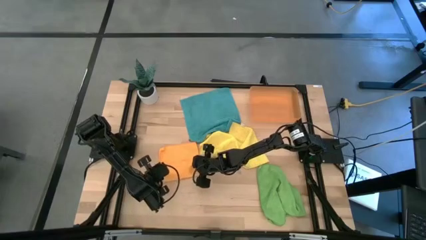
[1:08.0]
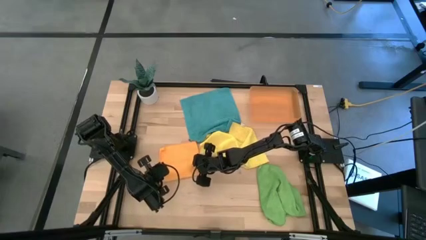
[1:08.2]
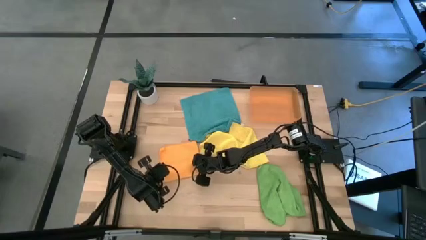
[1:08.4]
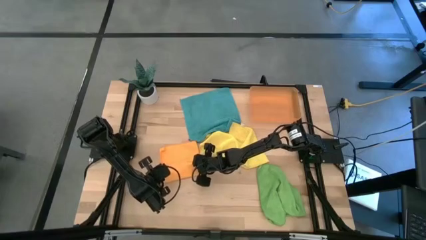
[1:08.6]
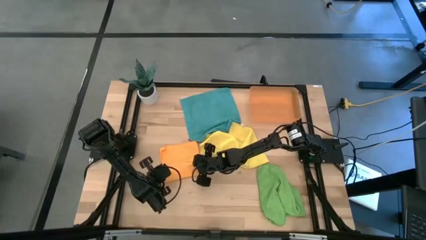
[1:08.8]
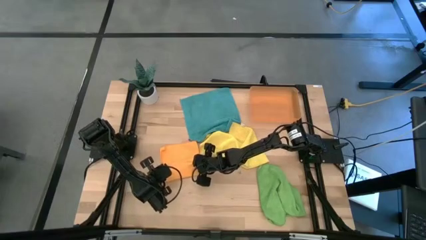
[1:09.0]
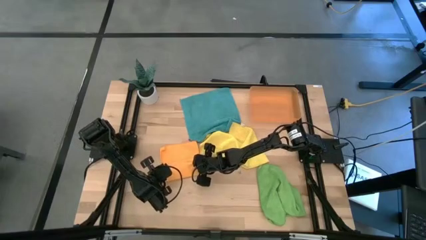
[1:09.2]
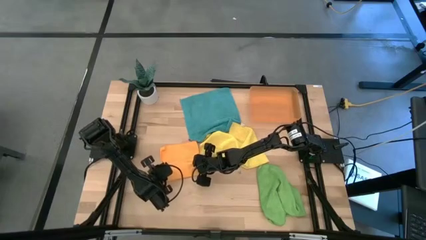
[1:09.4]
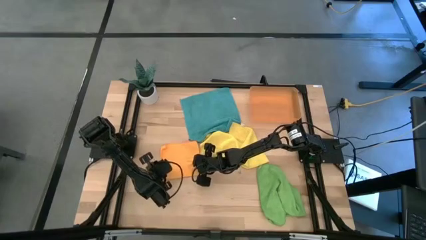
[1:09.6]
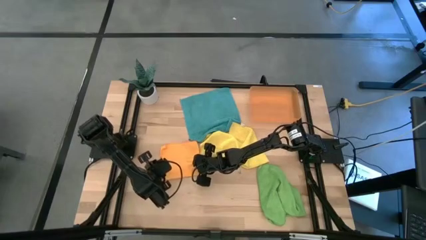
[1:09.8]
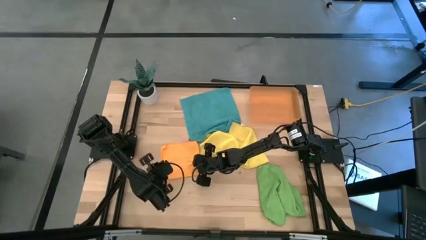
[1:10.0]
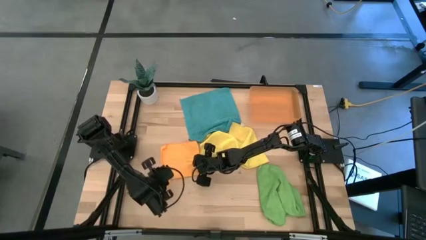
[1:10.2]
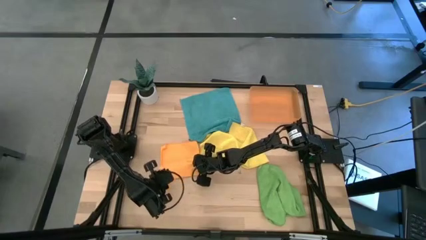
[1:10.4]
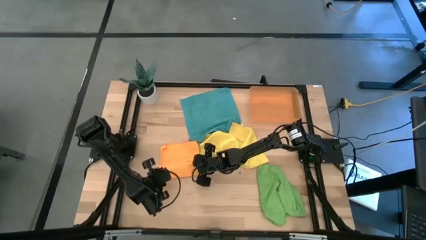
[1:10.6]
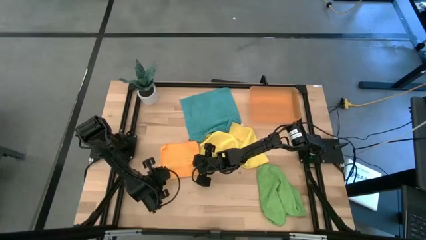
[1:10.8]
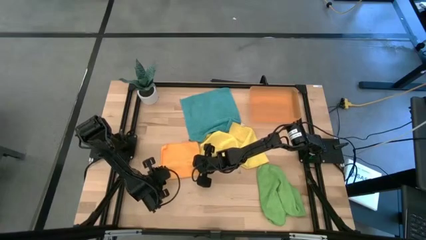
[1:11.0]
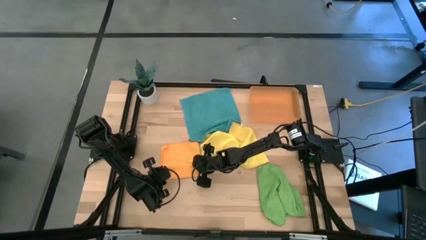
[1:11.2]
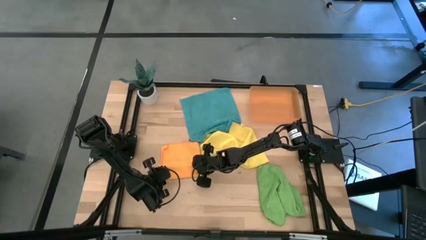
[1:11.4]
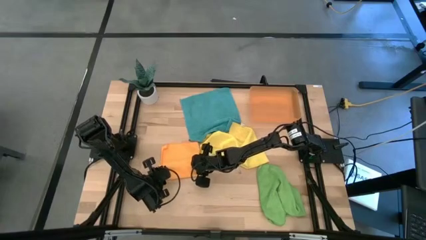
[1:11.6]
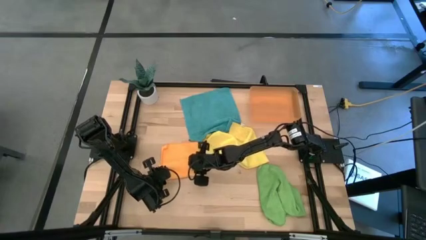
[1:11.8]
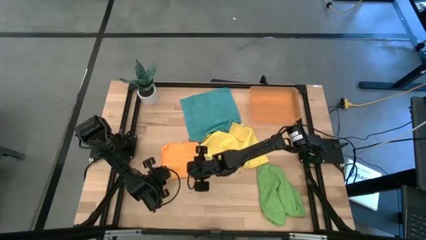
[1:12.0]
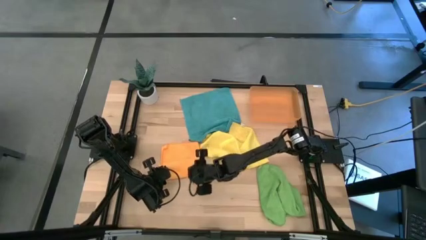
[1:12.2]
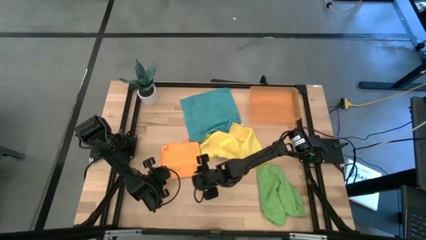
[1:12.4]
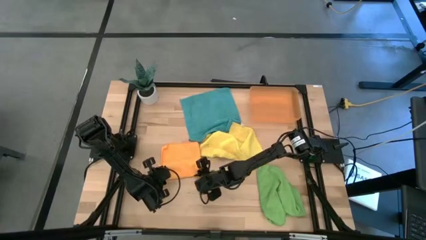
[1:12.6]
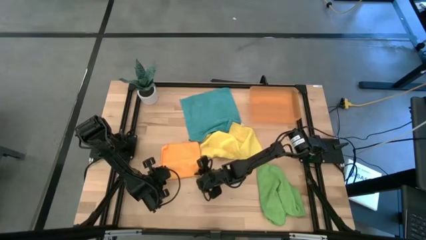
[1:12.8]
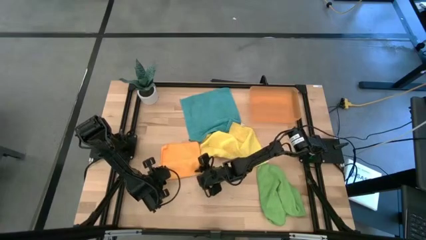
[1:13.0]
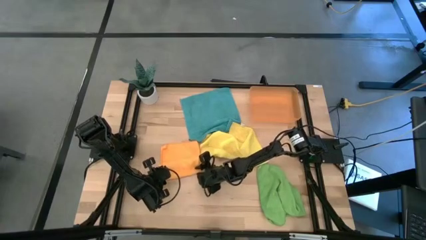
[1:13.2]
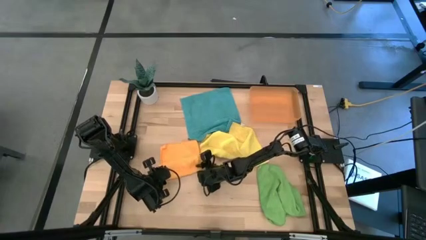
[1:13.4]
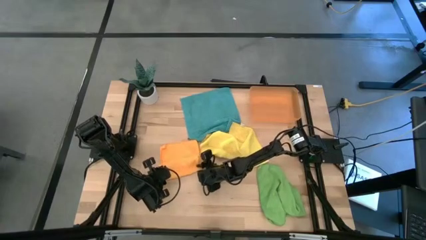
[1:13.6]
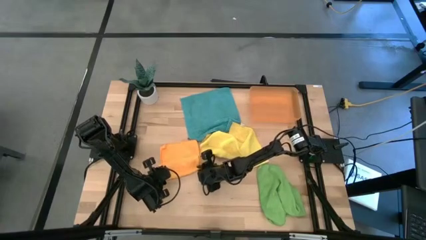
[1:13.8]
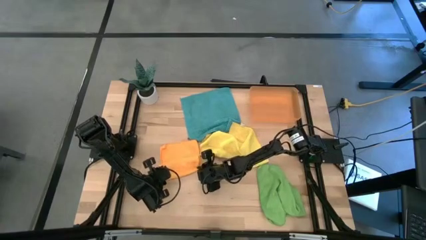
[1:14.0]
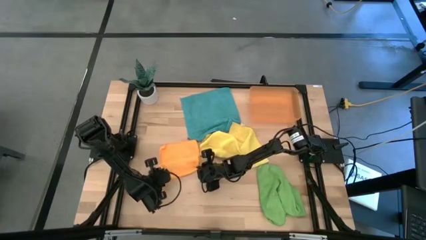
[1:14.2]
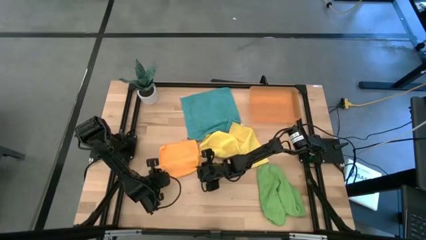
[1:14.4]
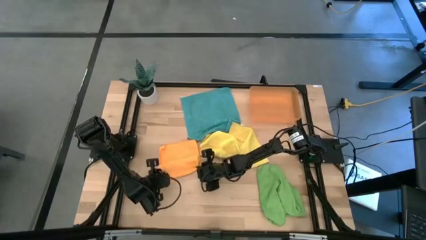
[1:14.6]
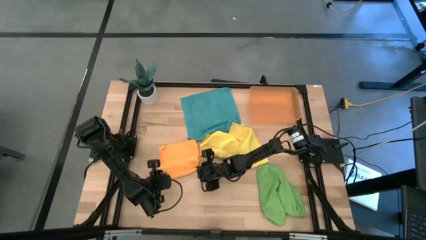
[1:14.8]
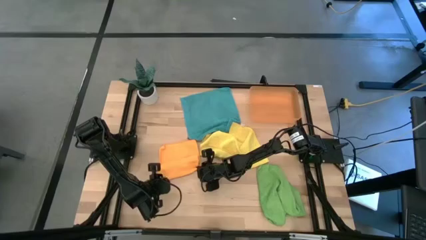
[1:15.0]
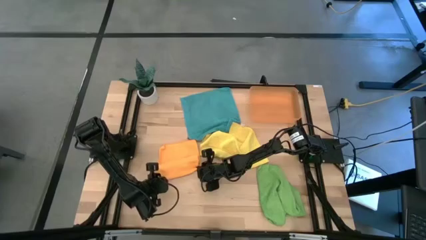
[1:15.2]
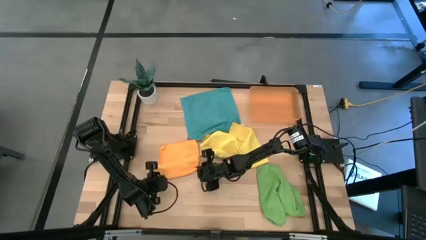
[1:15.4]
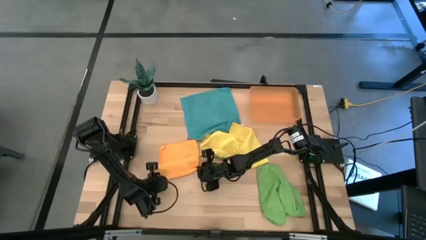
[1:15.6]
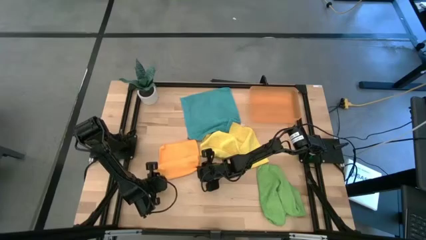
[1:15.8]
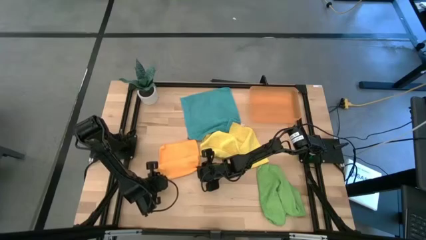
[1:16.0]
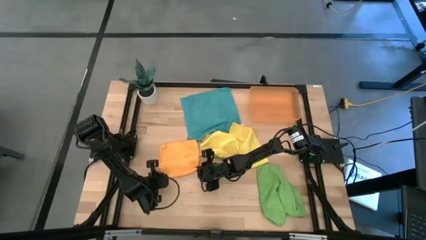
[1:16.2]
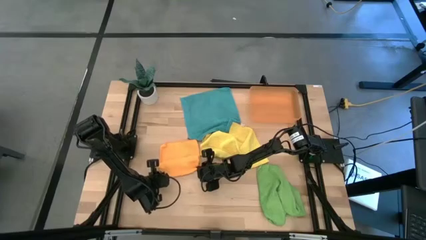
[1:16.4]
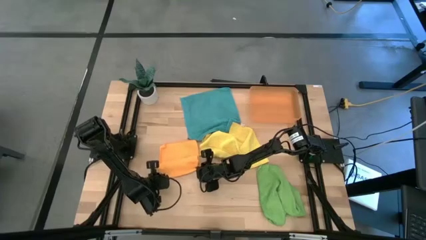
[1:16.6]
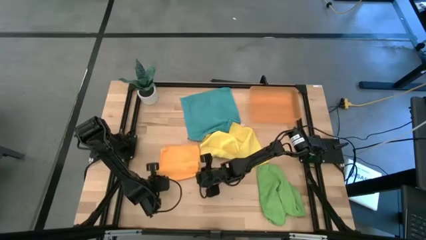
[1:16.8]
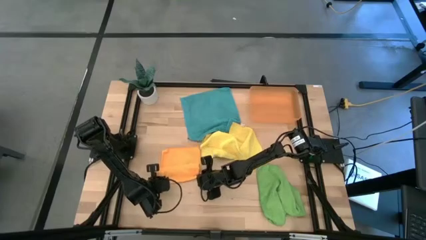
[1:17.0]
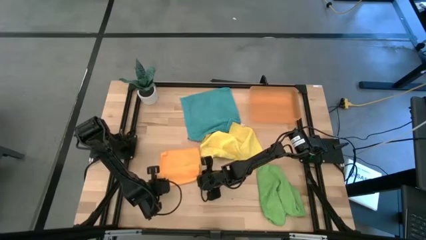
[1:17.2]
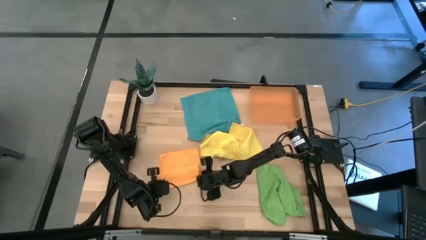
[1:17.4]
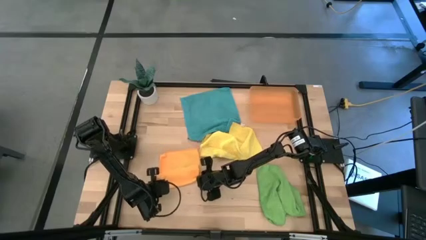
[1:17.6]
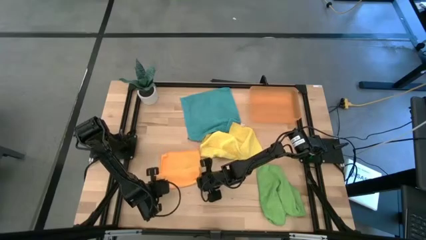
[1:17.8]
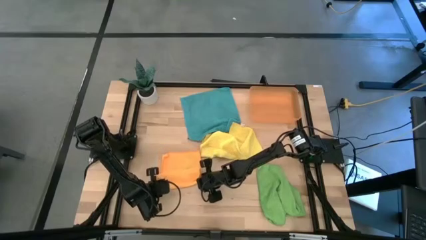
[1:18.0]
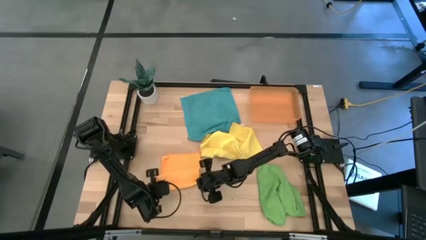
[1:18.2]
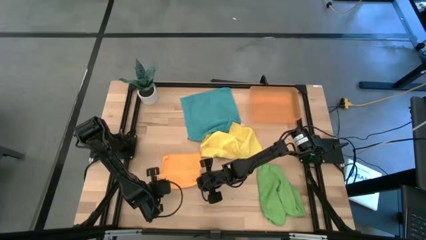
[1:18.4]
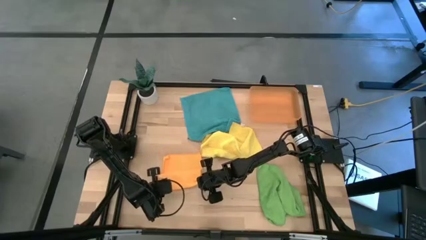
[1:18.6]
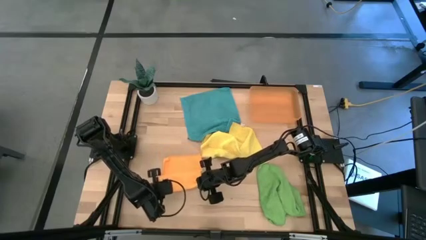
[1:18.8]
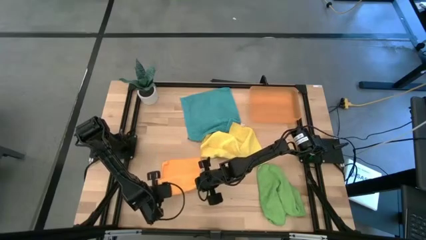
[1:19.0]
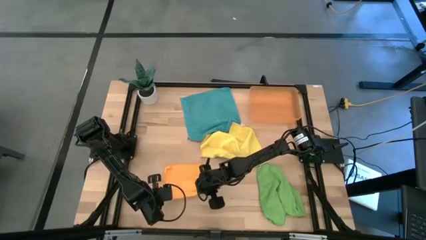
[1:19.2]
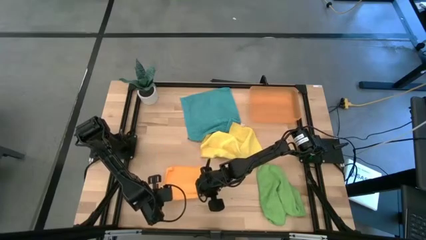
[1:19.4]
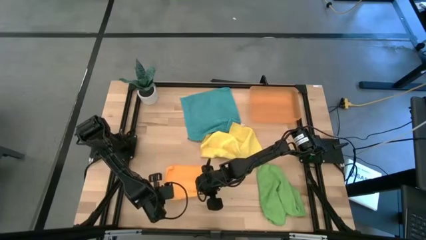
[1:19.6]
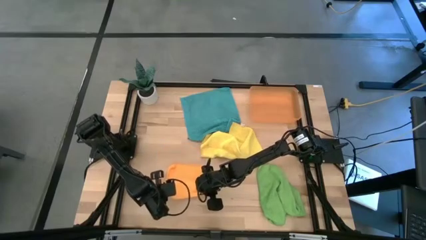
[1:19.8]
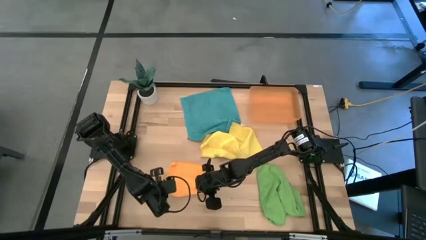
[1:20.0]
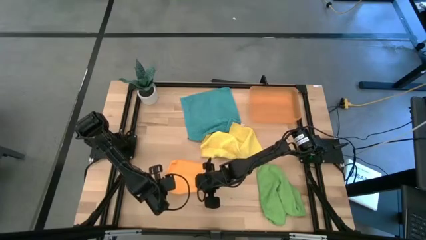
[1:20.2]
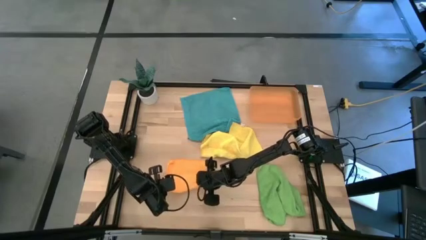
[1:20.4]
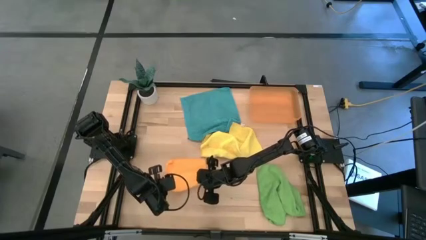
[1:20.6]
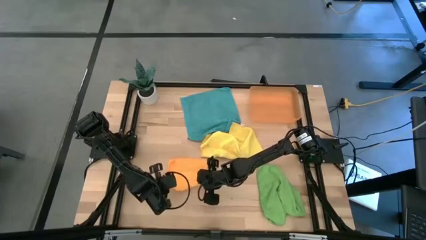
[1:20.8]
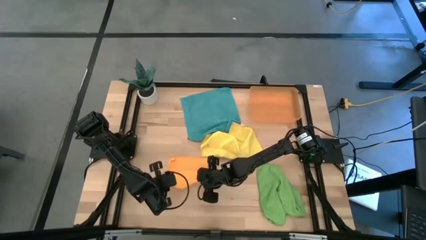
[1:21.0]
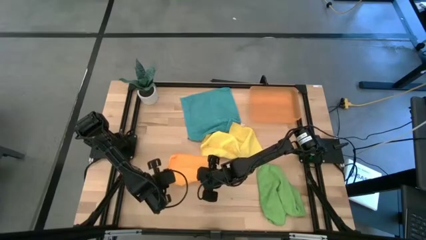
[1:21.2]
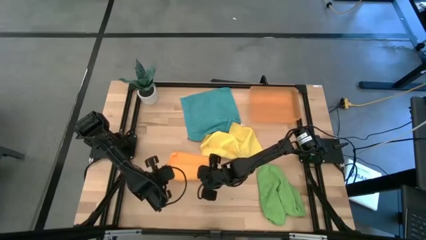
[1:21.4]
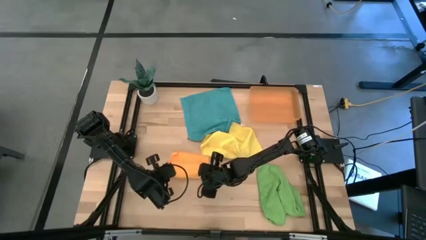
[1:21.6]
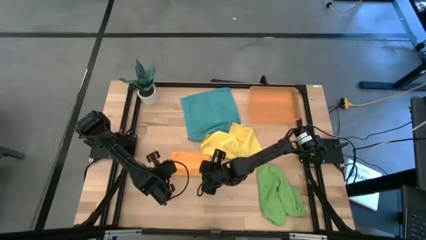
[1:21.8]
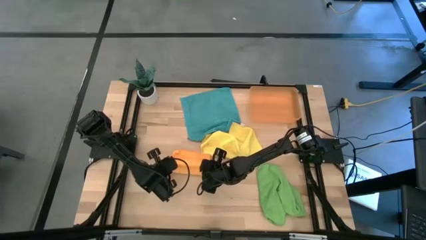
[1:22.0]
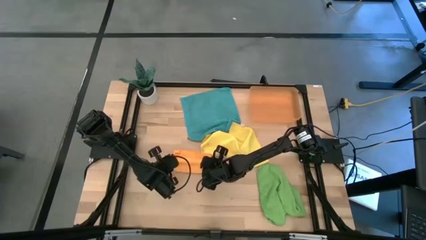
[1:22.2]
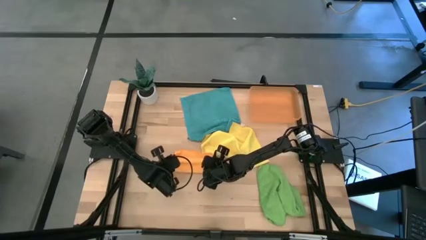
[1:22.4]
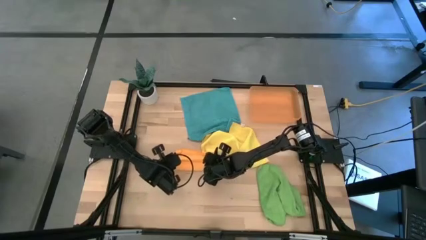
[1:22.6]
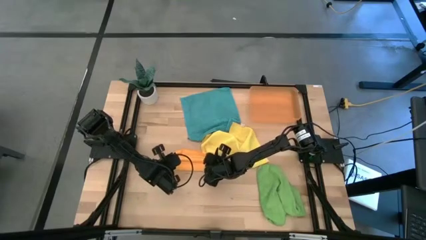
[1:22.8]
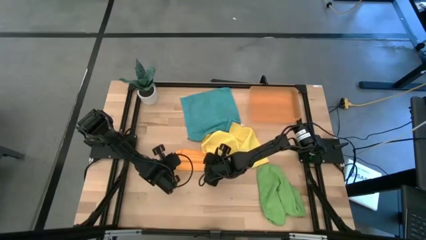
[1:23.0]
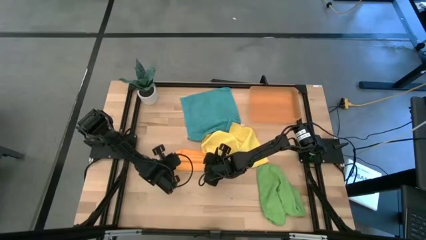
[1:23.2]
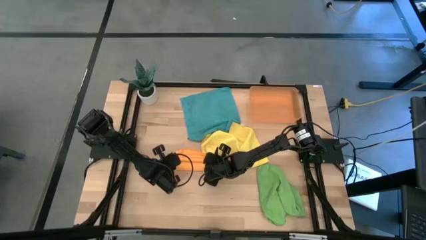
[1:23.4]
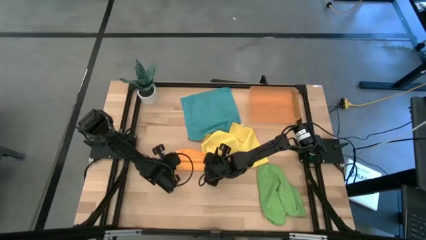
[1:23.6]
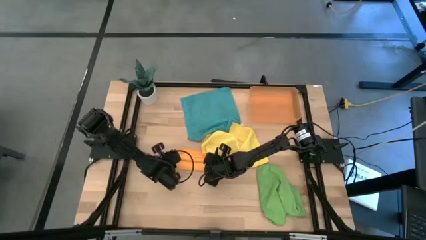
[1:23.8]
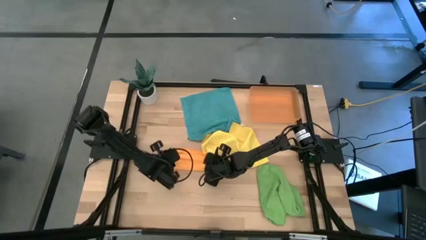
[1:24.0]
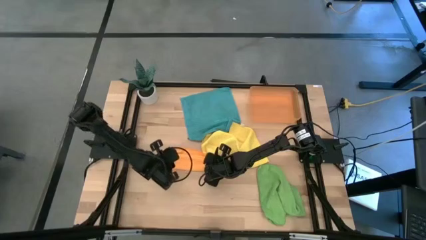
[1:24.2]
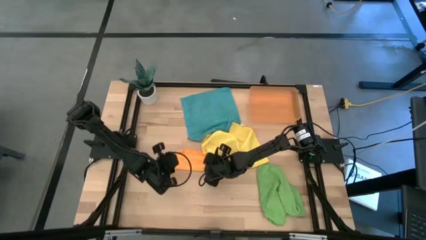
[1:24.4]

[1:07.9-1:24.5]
Task: Roll microfiber towels into tight, uniform cylinder then place into a basket
Roll the orange microfiber towel
